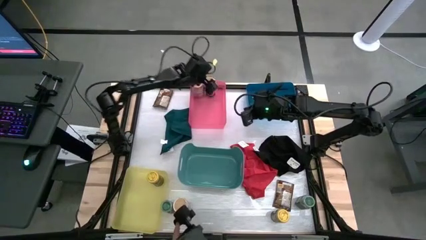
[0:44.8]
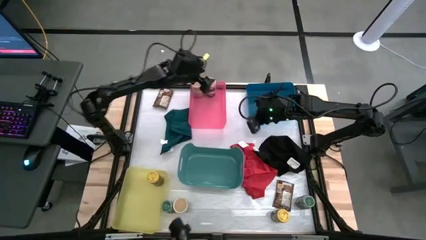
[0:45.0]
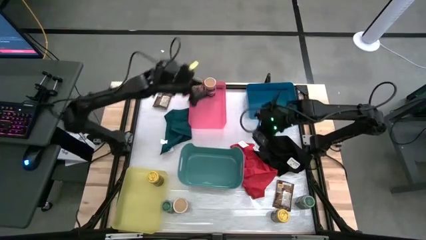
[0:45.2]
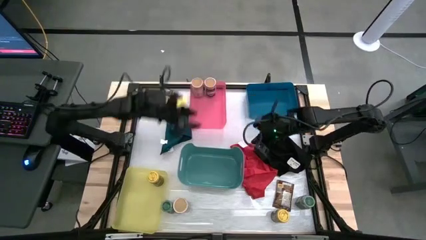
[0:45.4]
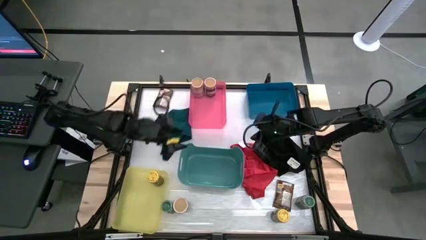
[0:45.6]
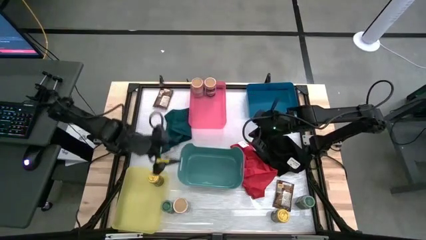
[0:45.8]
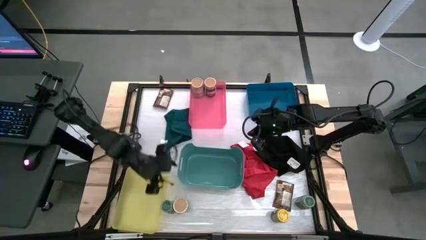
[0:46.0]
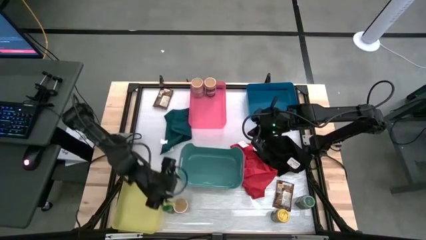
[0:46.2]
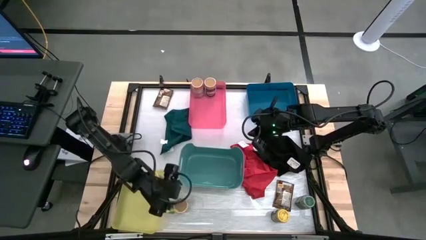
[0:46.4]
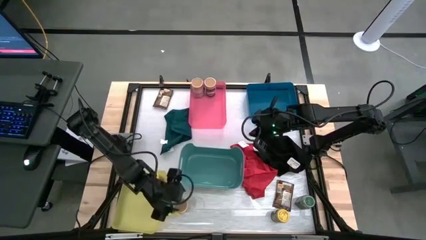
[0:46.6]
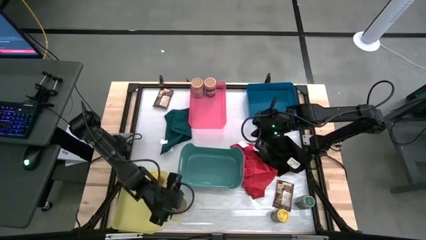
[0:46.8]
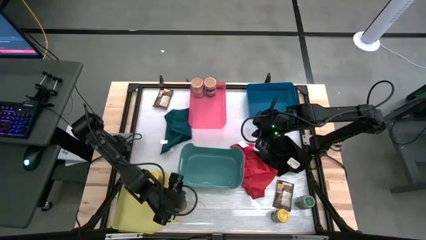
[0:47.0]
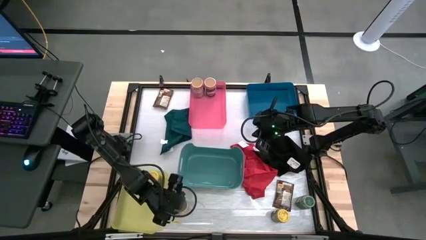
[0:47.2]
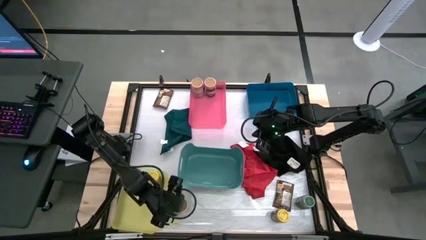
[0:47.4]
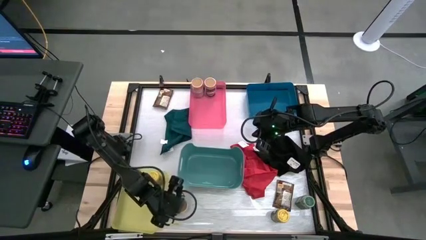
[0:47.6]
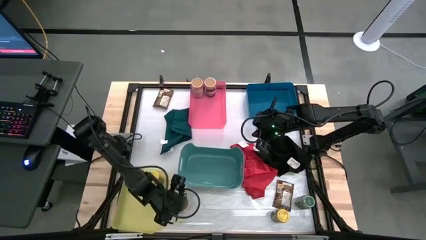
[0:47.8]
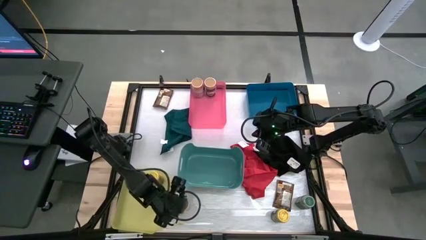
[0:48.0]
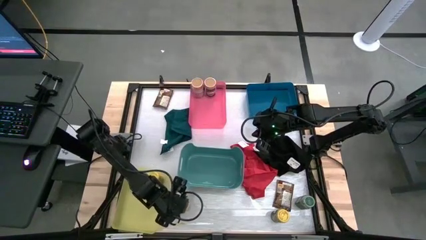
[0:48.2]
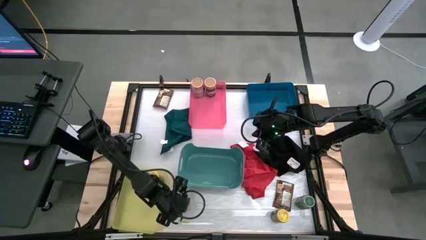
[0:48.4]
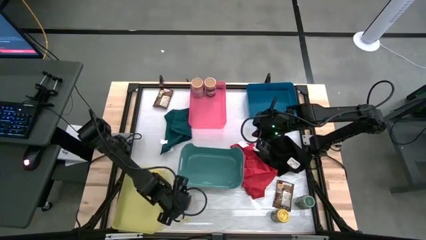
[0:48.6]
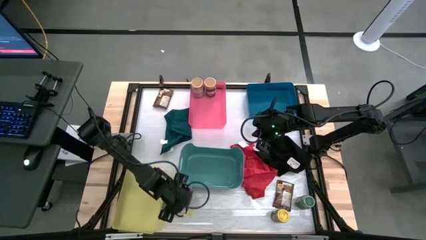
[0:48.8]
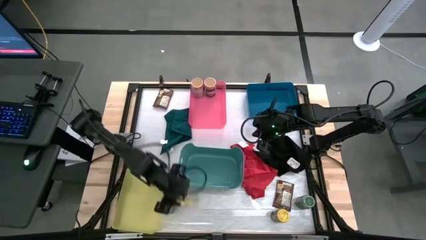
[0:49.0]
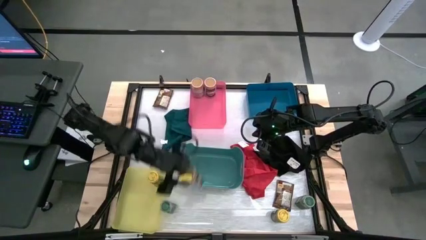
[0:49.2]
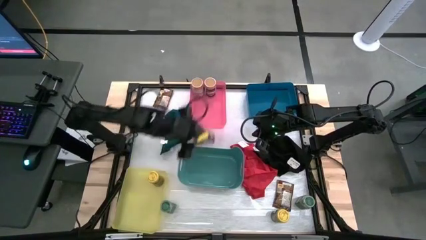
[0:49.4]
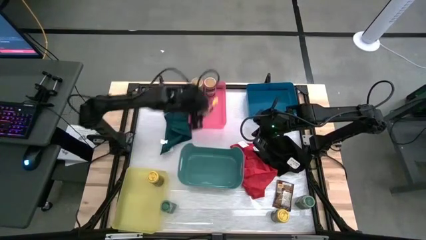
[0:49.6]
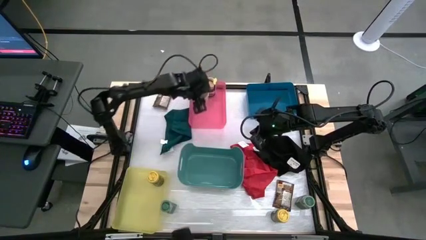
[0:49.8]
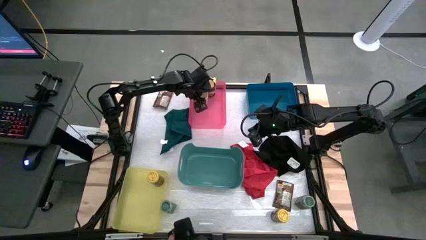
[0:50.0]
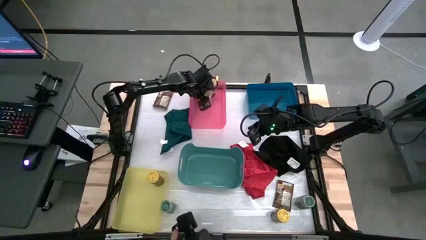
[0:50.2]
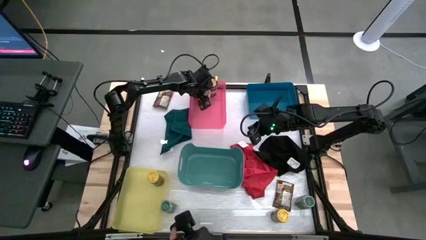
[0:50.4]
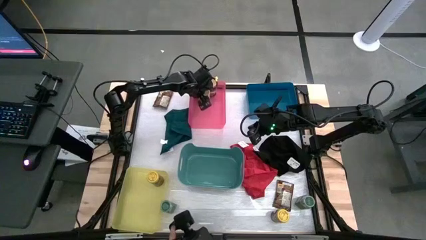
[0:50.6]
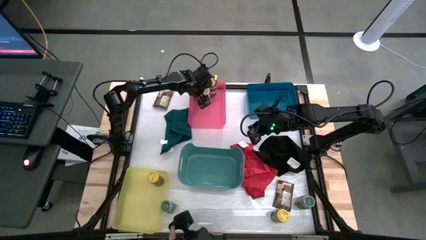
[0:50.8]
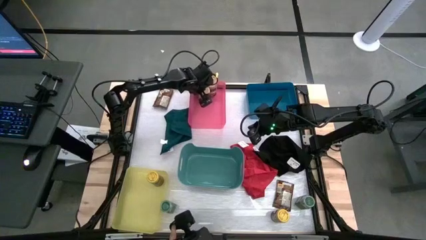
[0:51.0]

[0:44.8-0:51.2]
Task: Sort spices by type
Put the gold seasoning bottle into the pink bin

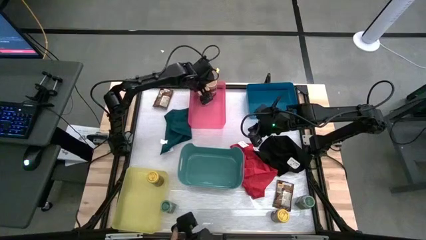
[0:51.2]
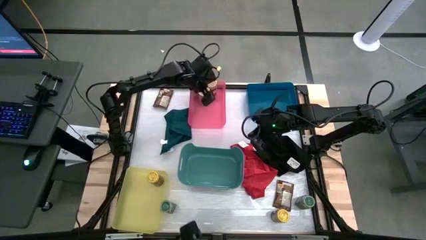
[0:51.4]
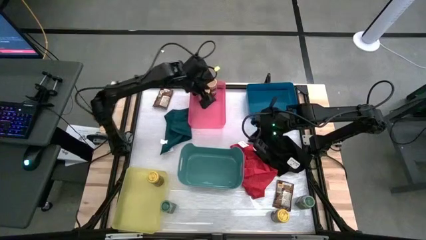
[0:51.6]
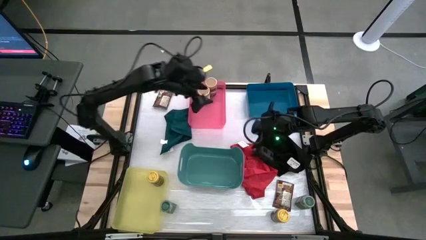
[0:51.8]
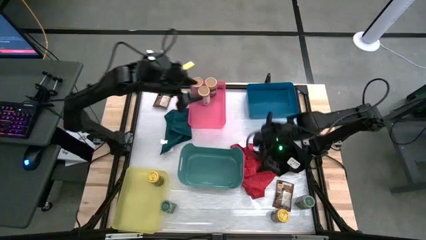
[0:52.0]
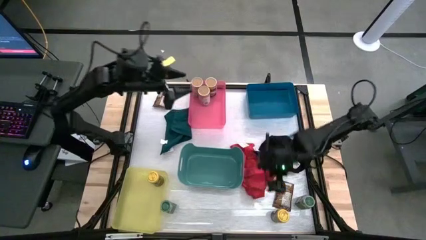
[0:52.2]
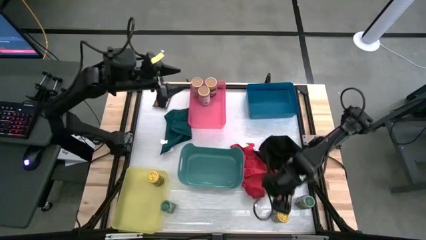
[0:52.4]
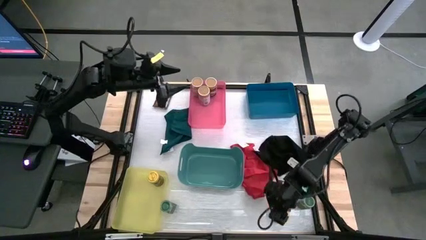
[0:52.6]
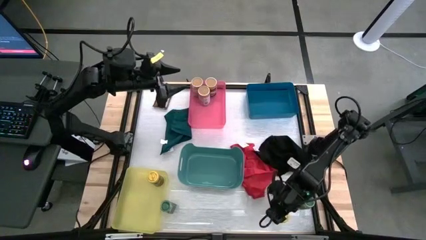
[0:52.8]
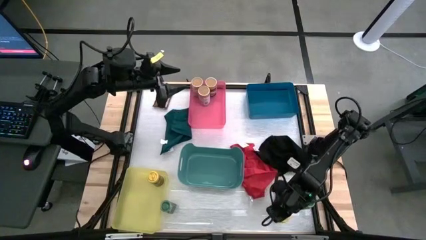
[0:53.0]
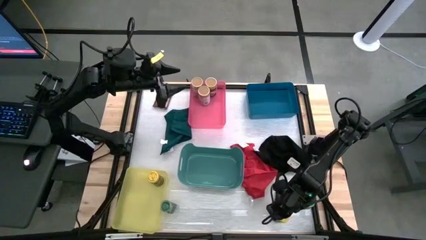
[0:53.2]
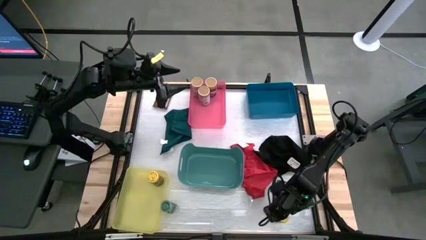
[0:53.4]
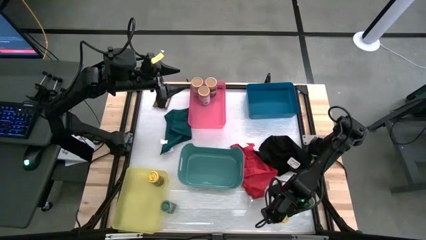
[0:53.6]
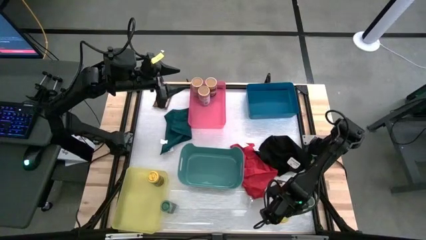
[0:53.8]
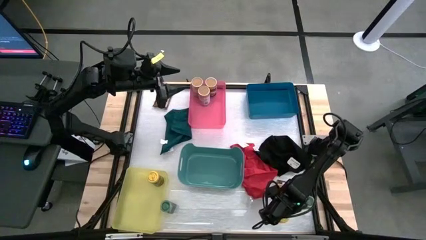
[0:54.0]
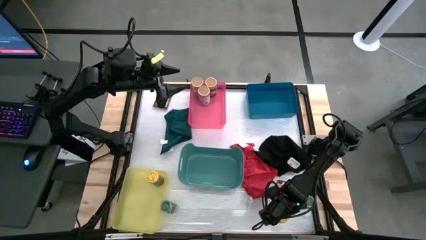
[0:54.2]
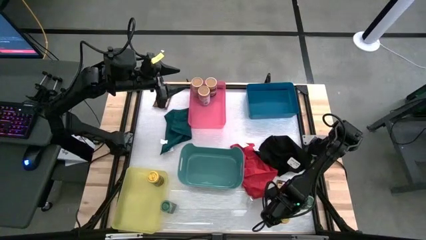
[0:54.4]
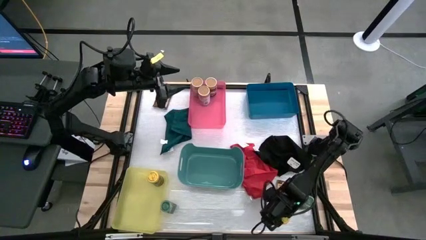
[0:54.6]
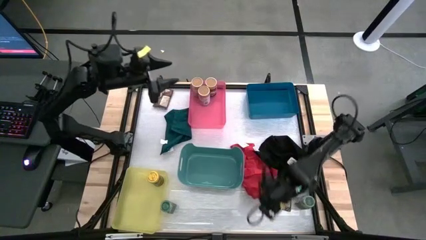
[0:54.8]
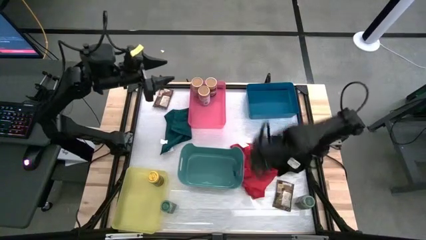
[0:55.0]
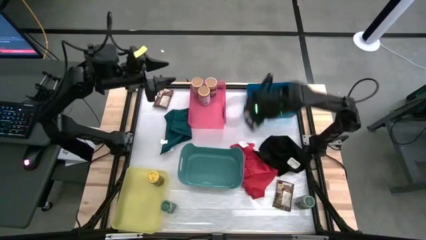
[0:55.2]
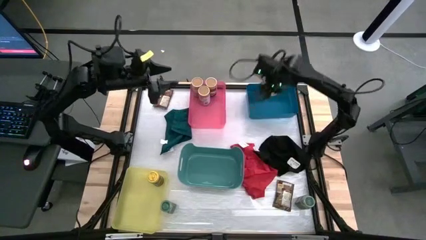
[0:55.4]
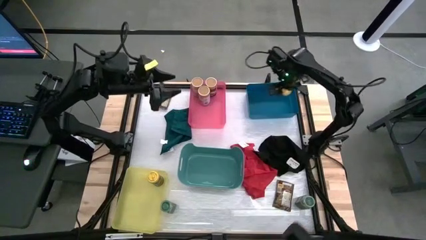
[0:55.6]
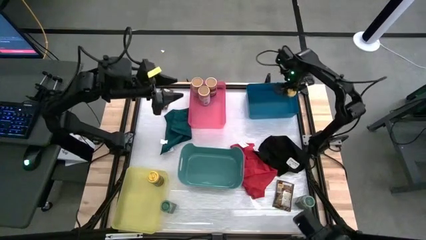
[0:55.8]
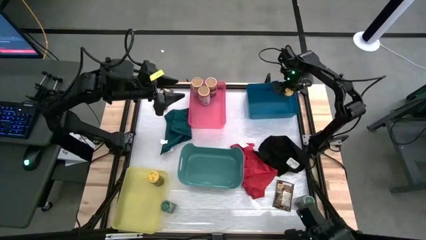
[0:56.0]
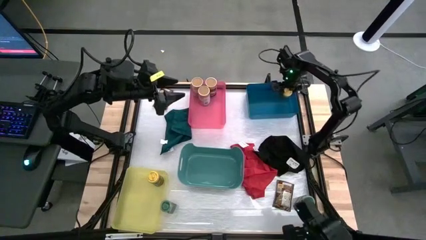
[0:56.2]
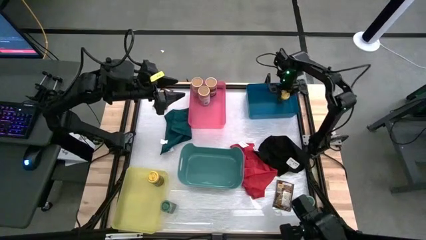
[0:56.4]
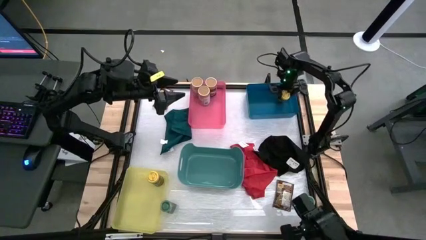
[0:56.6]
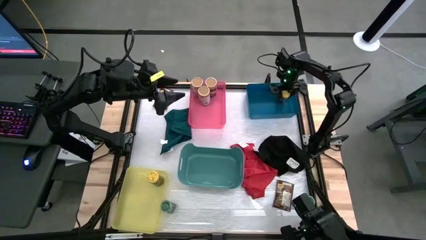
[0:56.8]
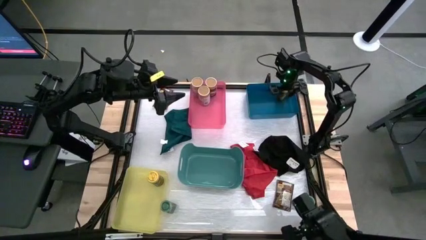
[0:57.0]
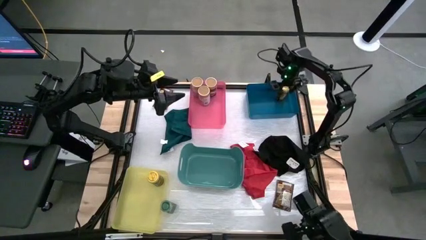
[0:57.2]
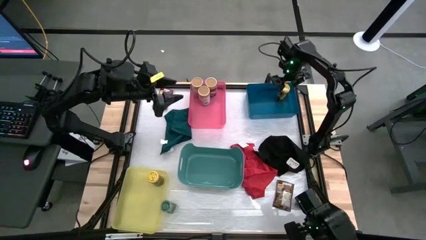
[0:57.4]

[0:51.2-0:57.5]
Put the yellow seasoning bottle into the blue bin
